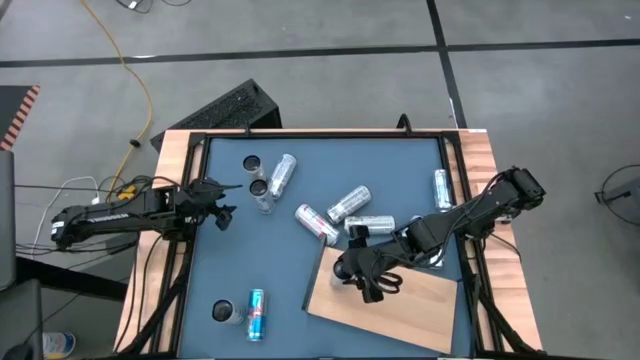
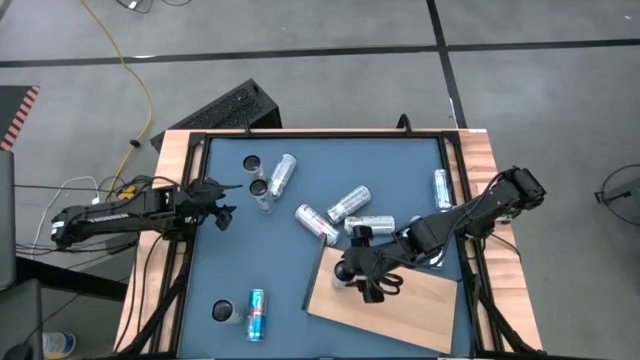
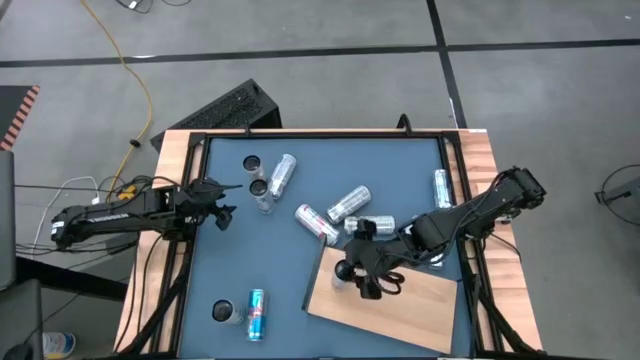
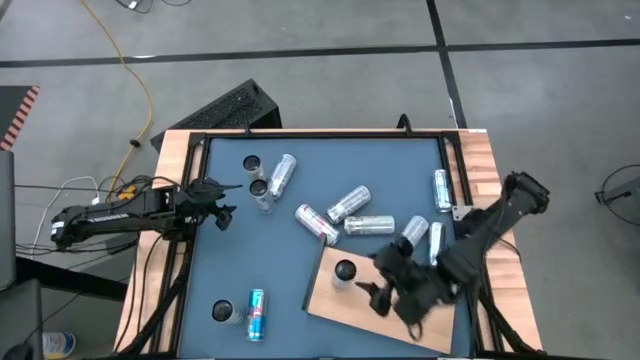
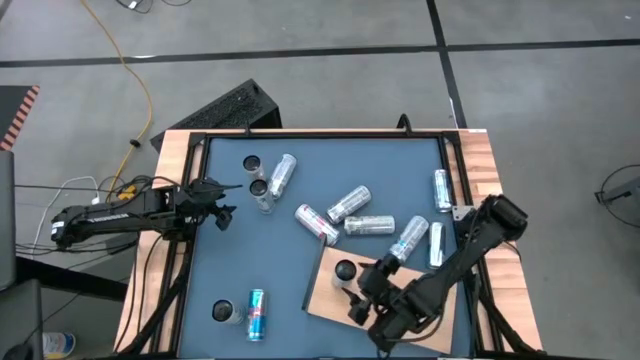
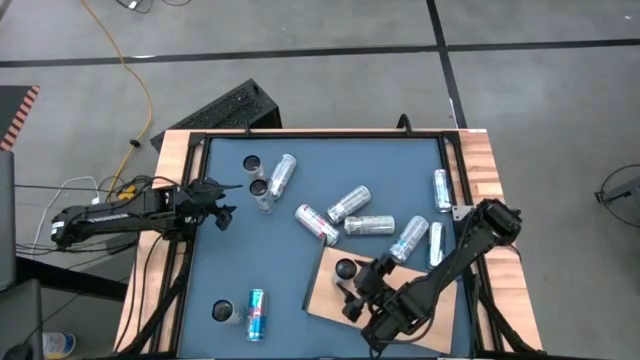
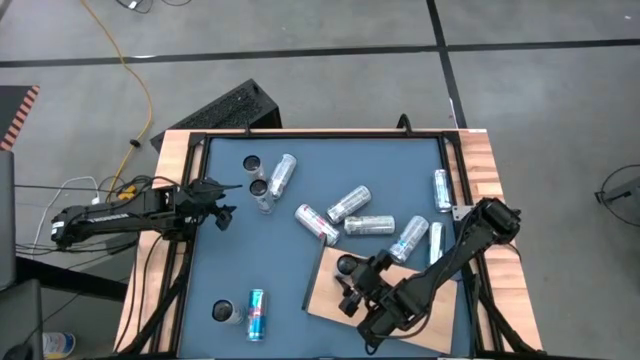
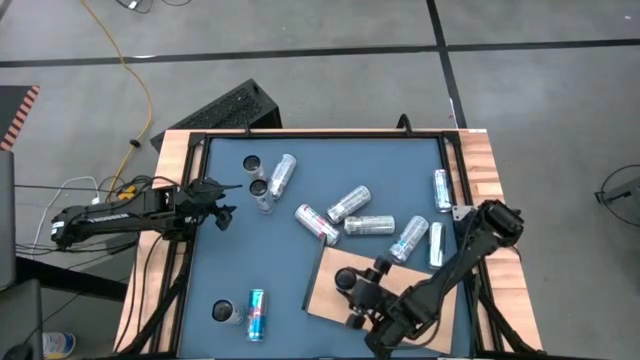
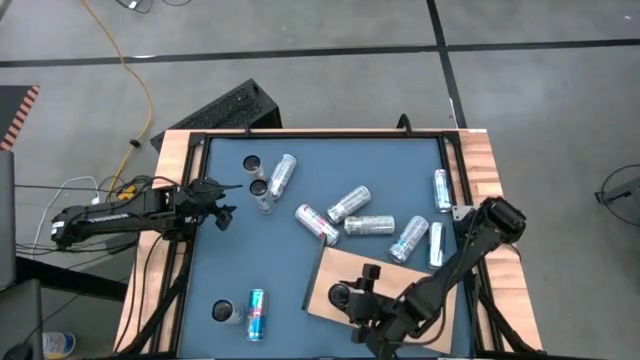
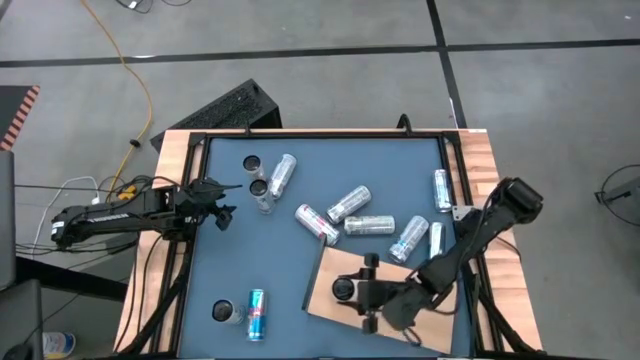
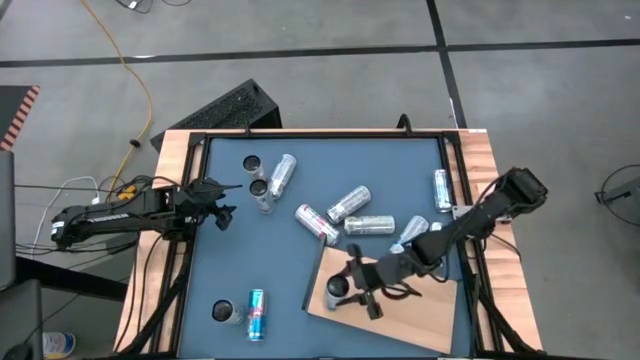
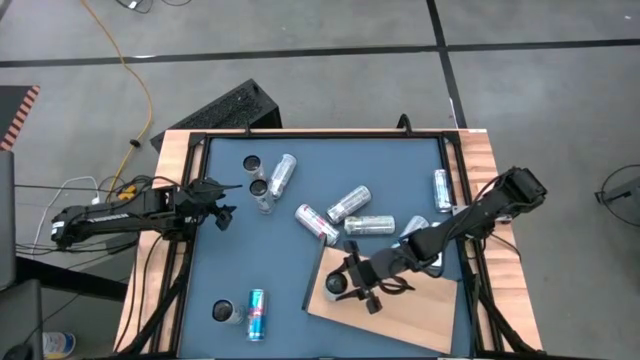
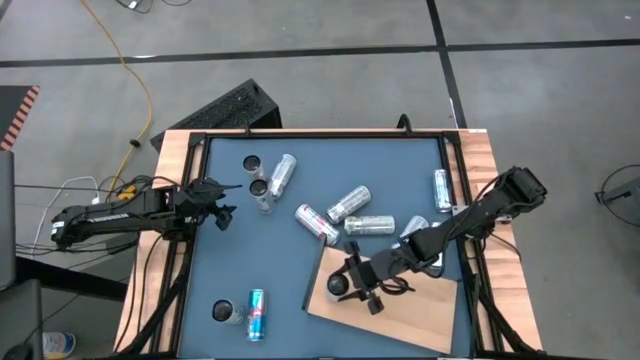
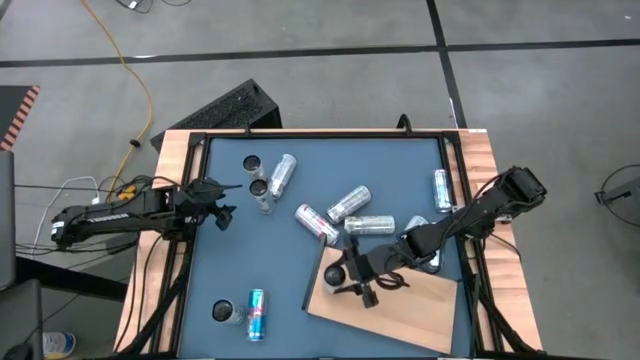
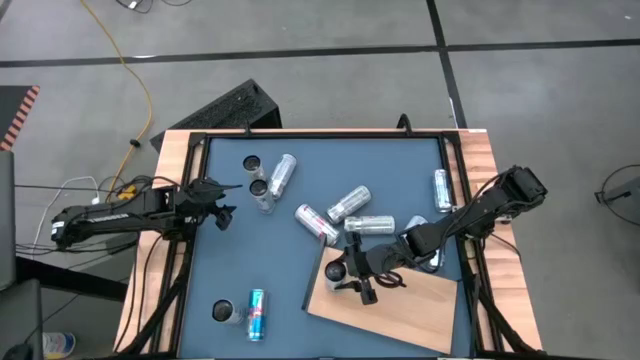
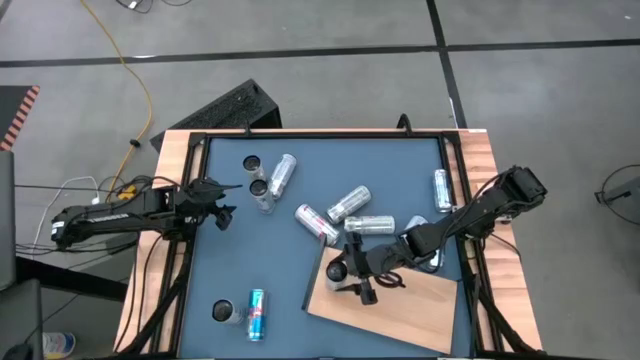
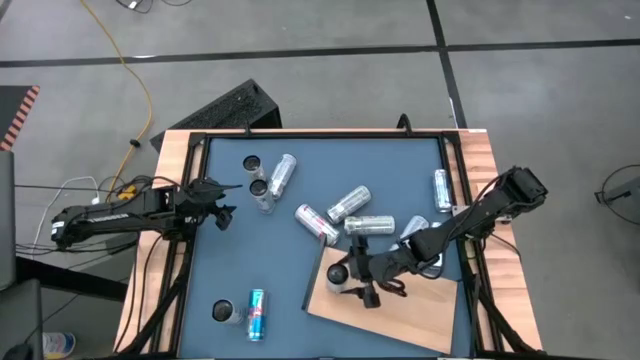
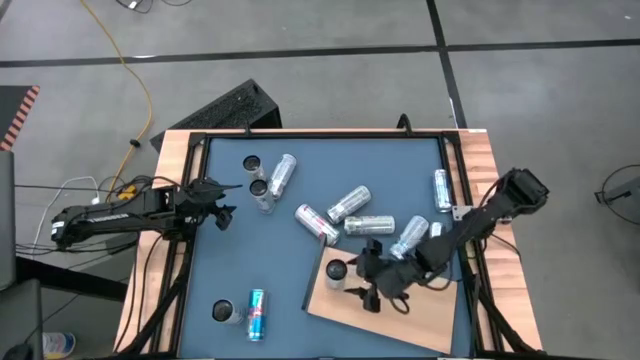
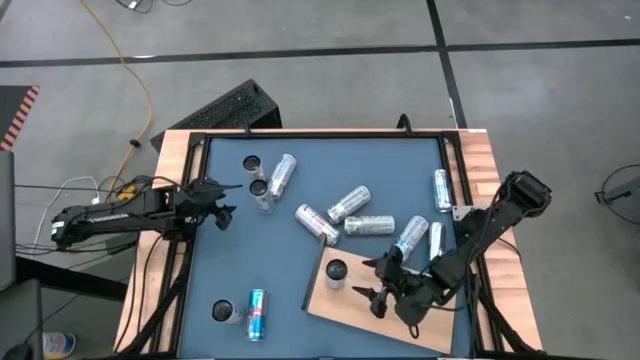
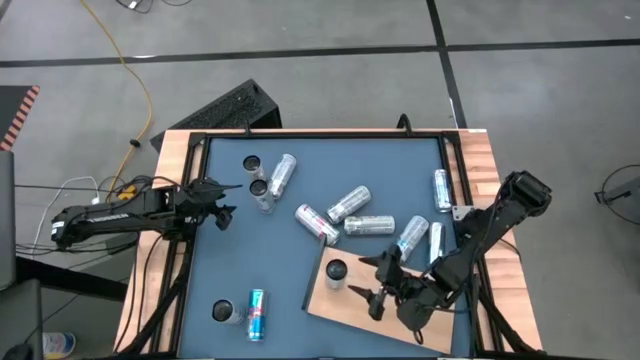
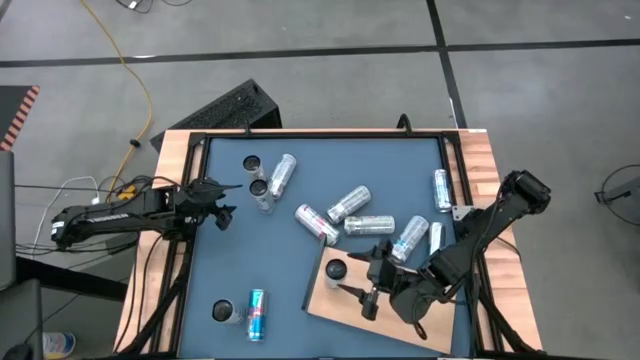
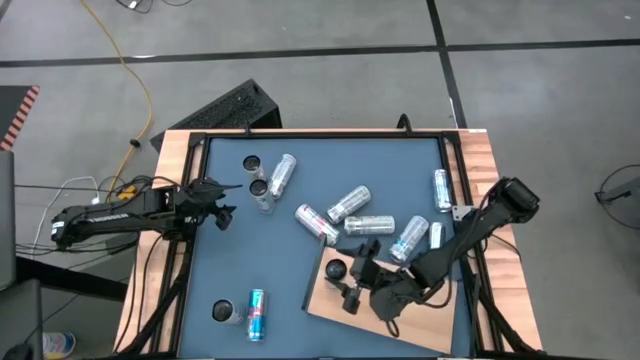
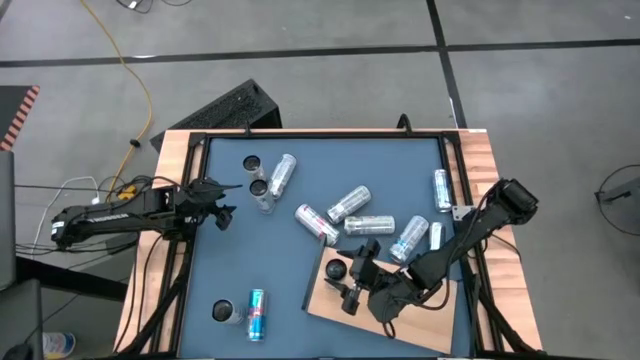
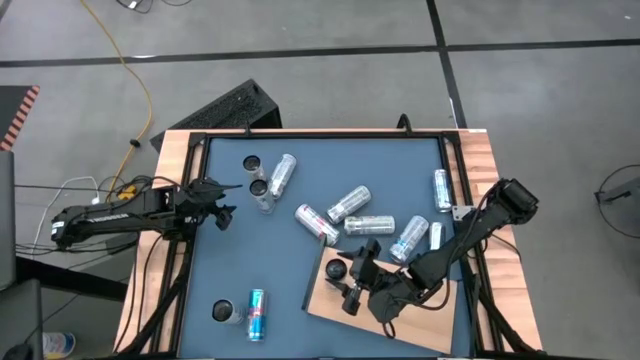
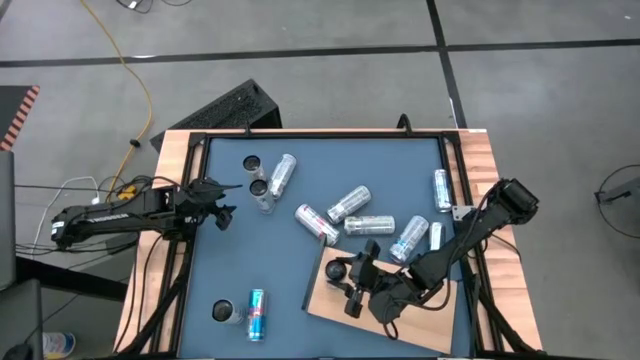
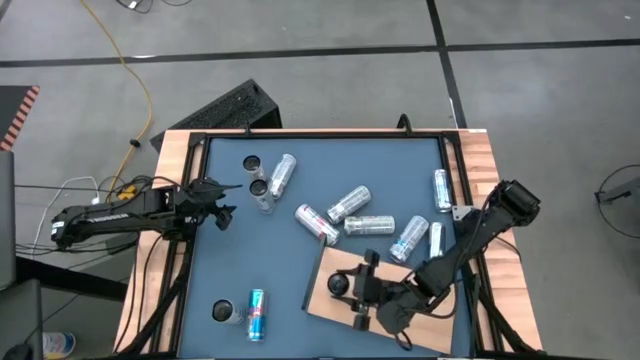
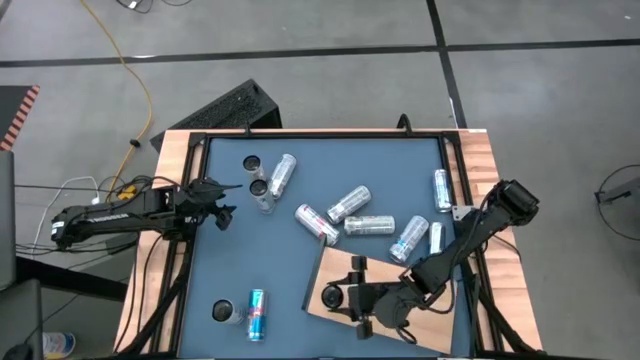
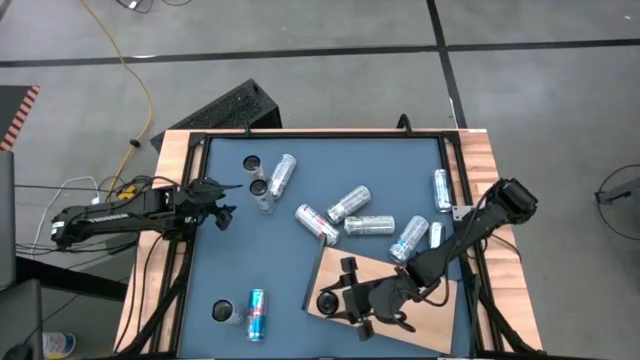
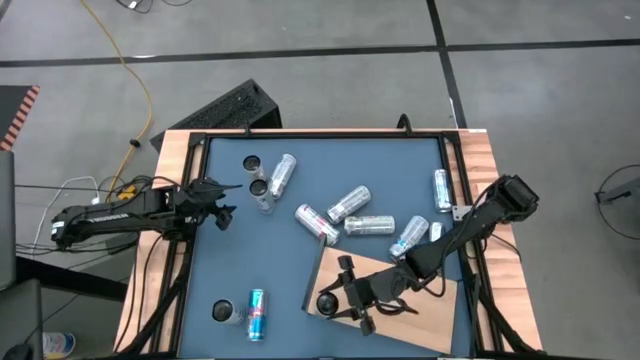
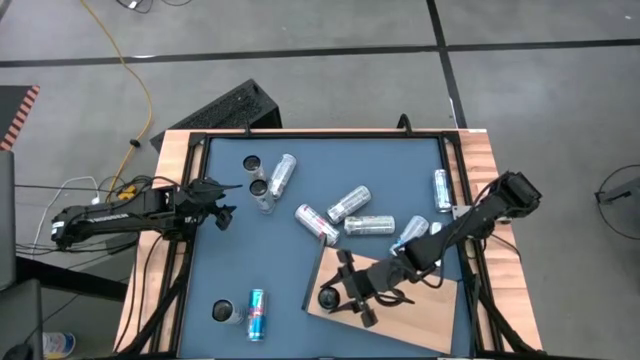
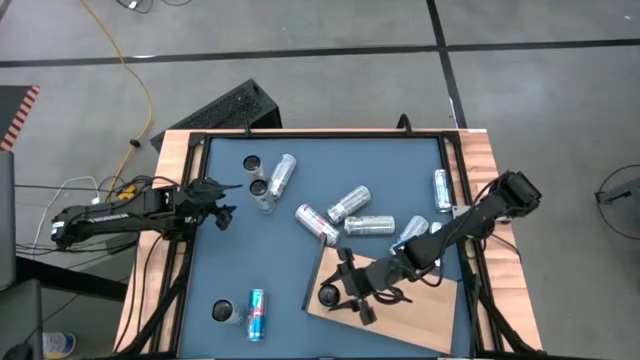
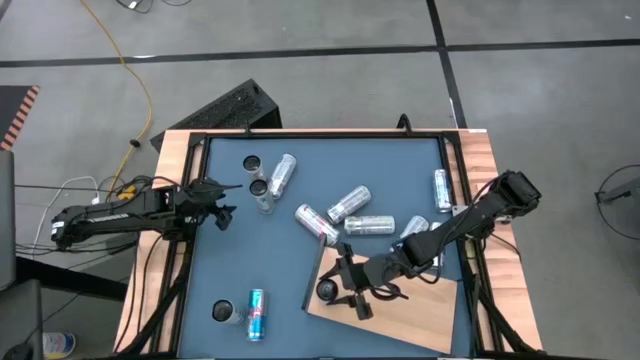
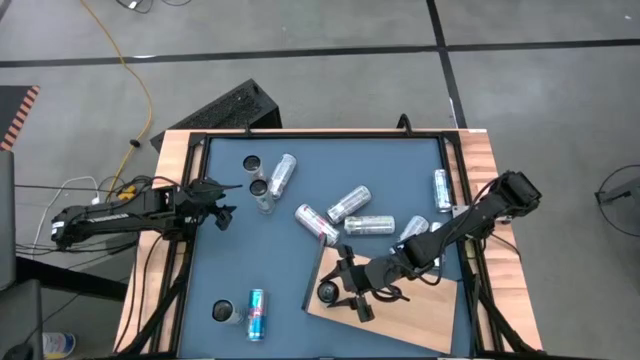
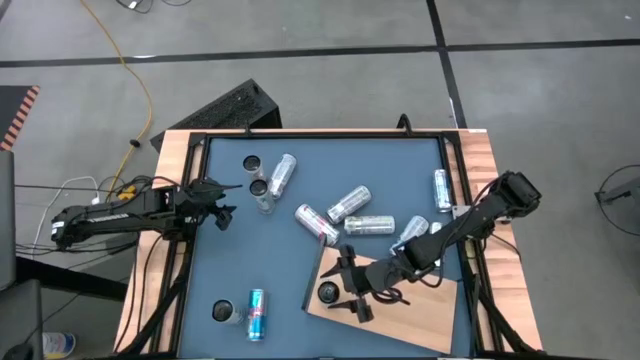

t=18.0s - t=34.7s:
Task: Place canned beverage on shelf
Put the top white blue soda can on the shelf

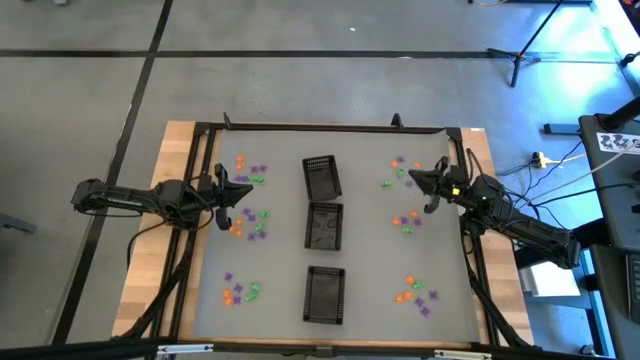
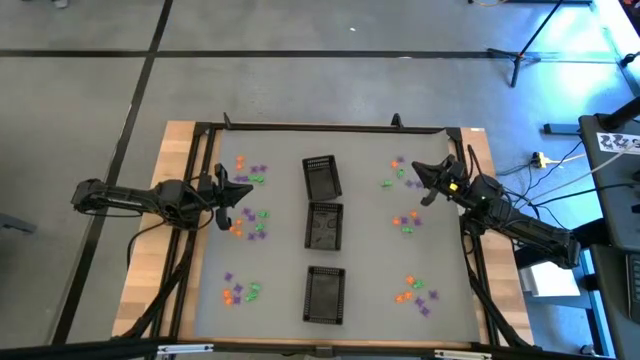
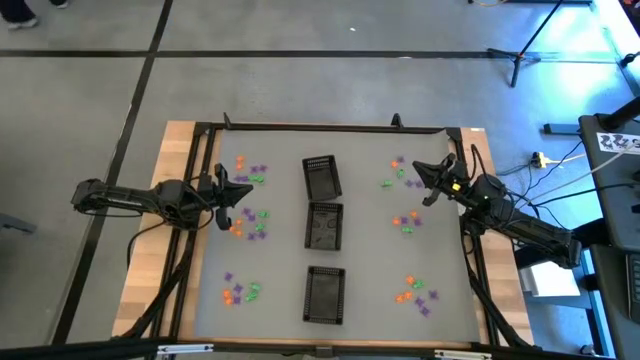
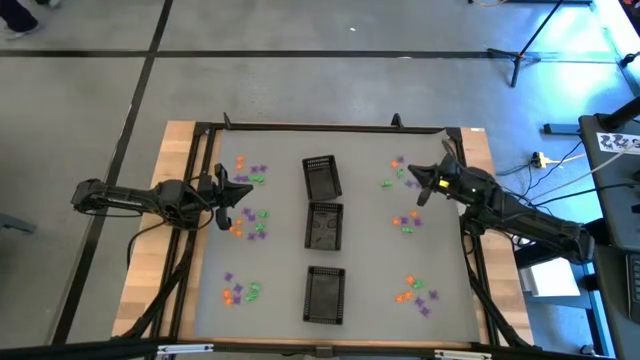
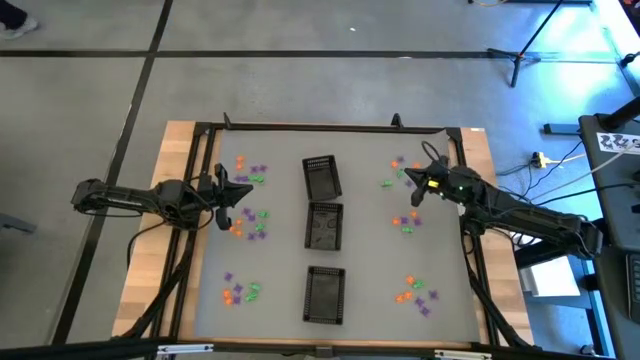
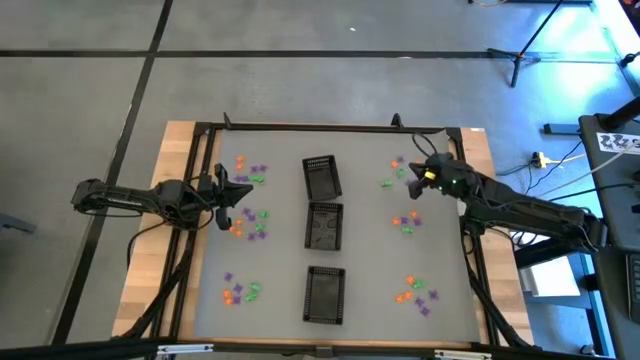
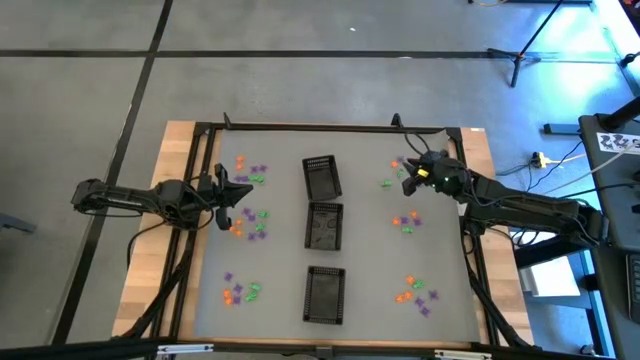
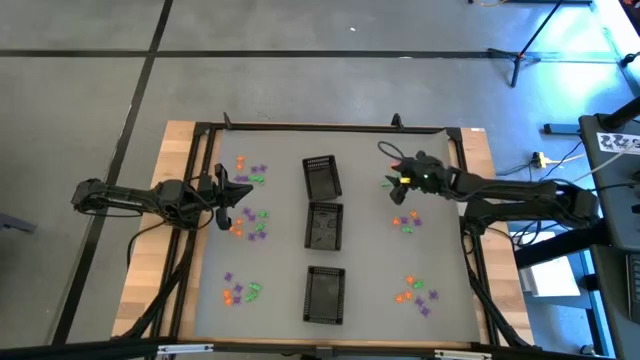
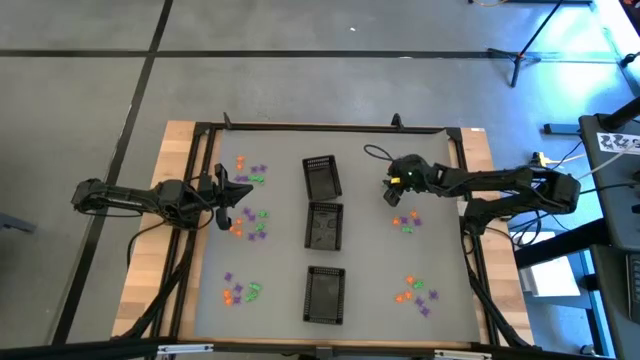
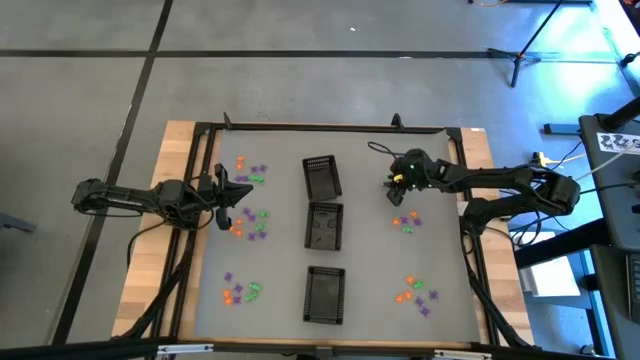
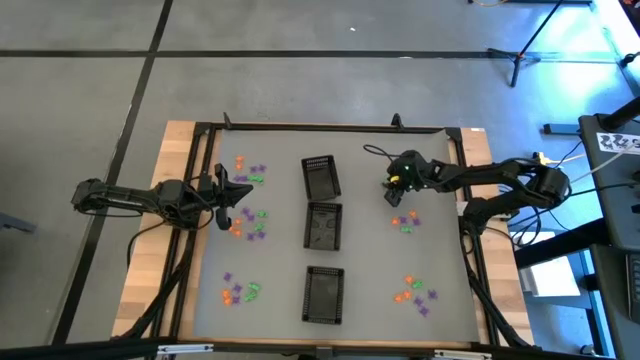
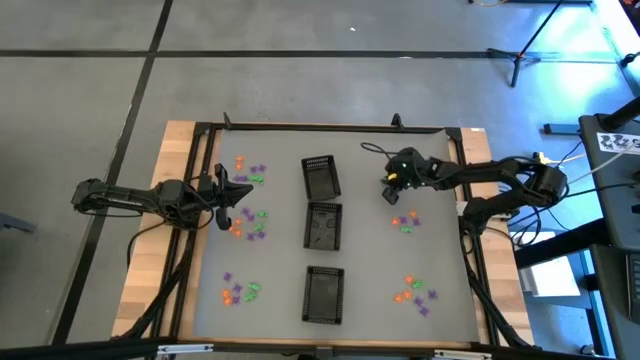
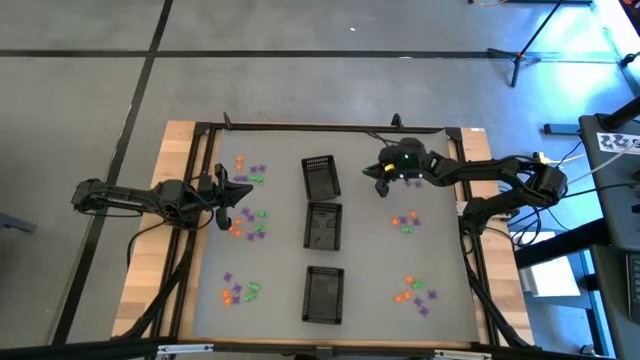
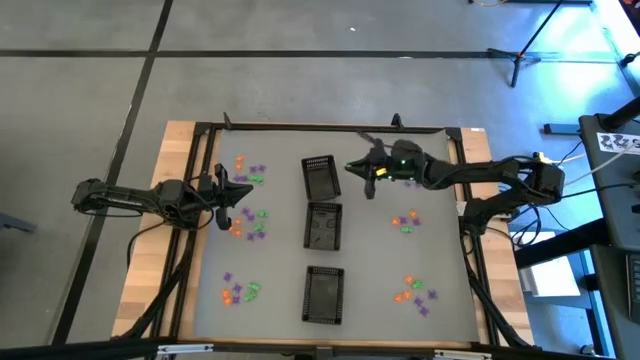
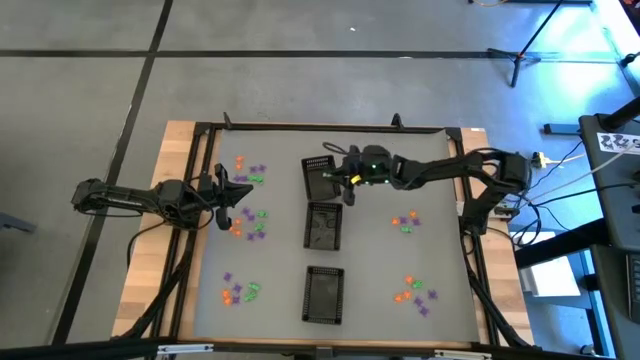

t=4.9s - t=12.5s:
Task: Sort Halloween decoration
Put the green skeleton toy into the top black bin
